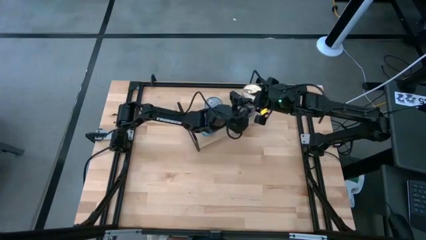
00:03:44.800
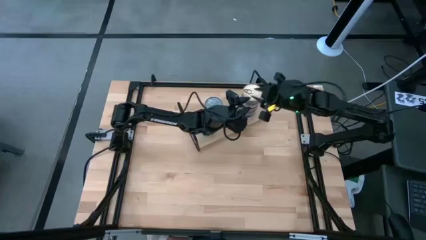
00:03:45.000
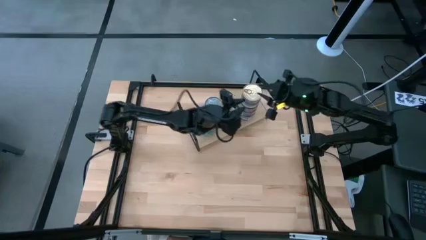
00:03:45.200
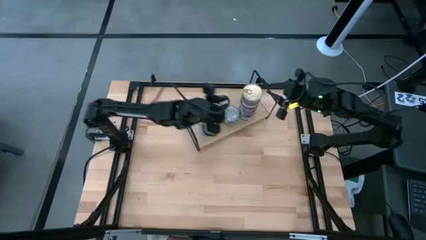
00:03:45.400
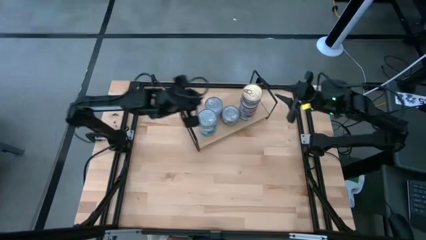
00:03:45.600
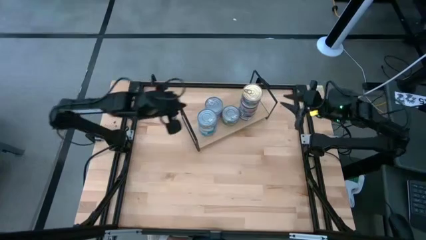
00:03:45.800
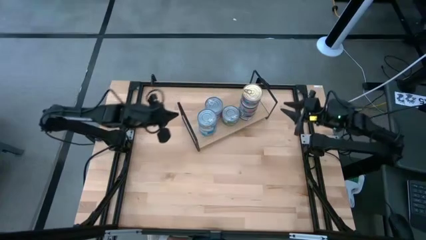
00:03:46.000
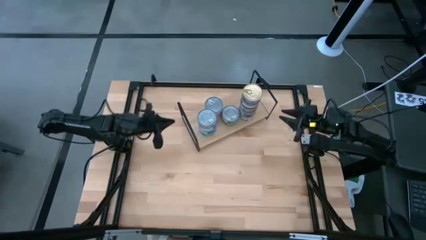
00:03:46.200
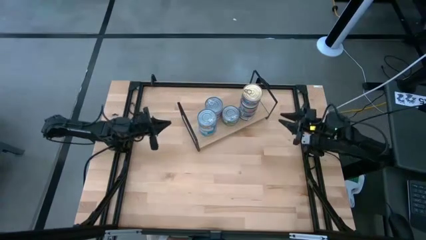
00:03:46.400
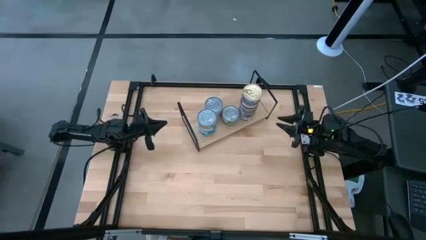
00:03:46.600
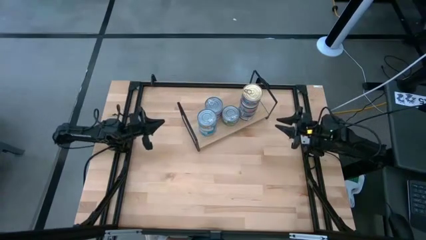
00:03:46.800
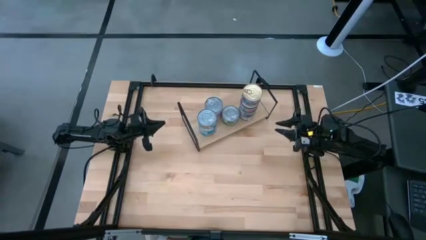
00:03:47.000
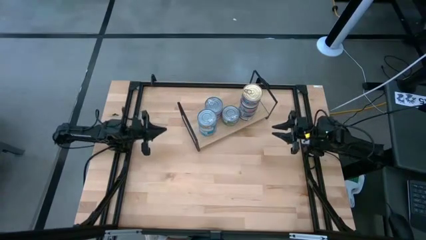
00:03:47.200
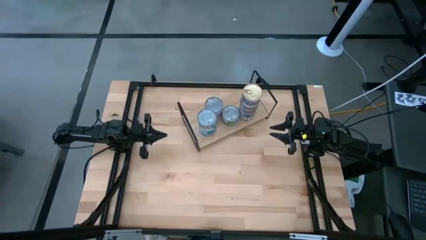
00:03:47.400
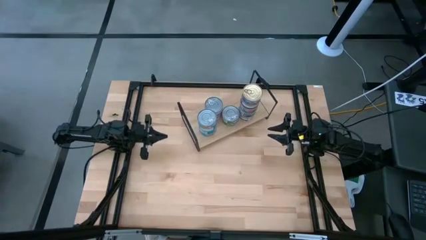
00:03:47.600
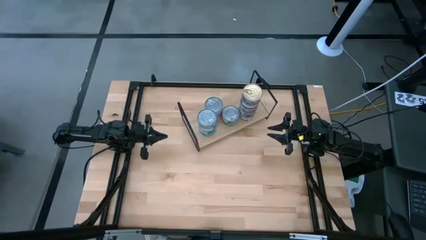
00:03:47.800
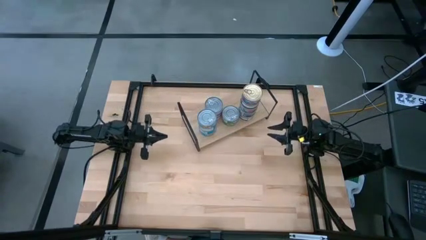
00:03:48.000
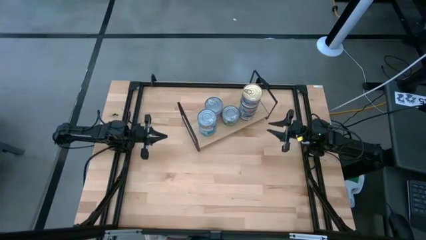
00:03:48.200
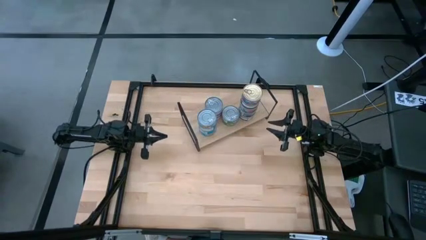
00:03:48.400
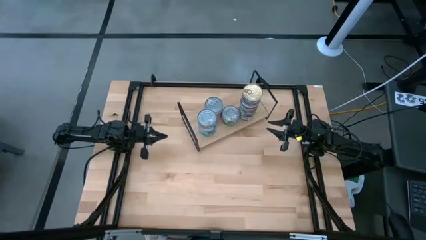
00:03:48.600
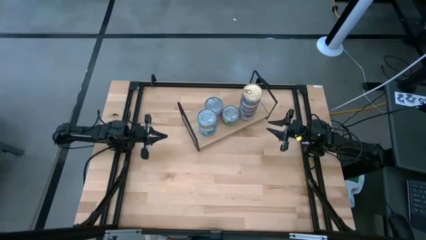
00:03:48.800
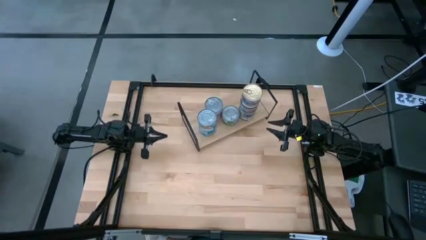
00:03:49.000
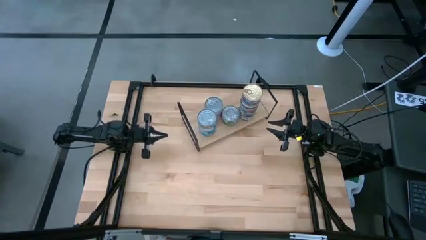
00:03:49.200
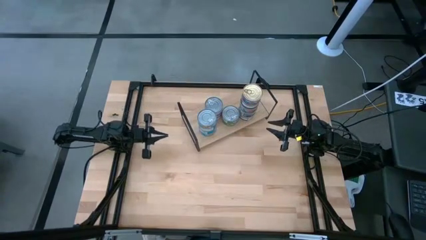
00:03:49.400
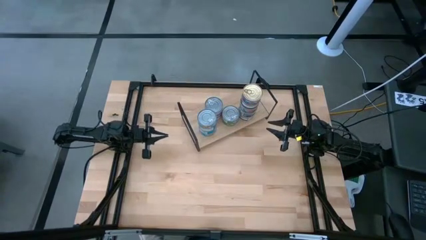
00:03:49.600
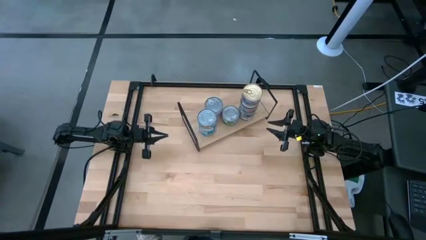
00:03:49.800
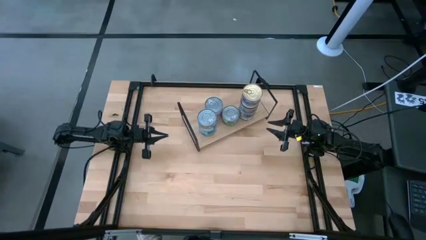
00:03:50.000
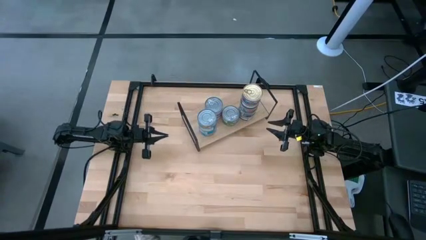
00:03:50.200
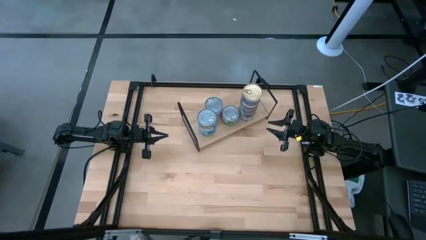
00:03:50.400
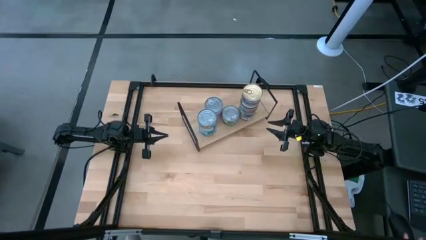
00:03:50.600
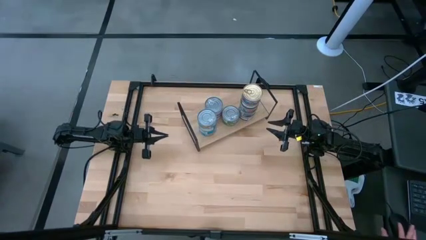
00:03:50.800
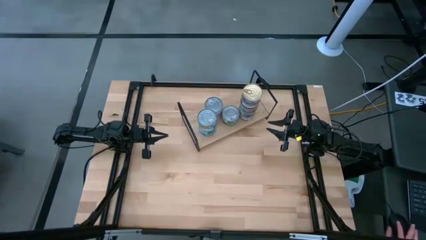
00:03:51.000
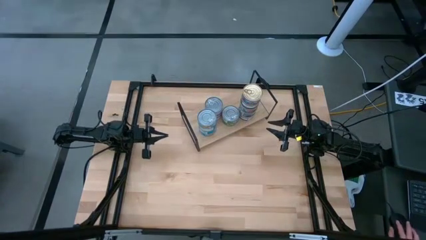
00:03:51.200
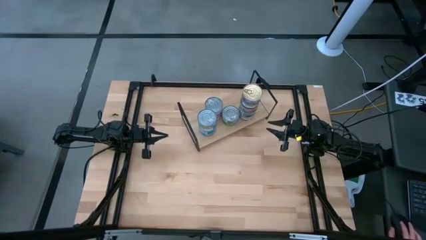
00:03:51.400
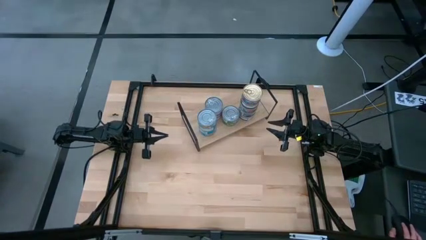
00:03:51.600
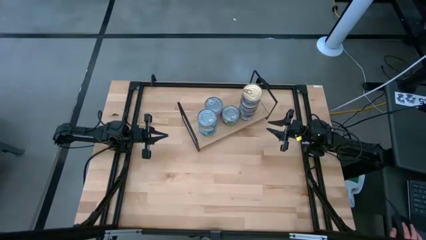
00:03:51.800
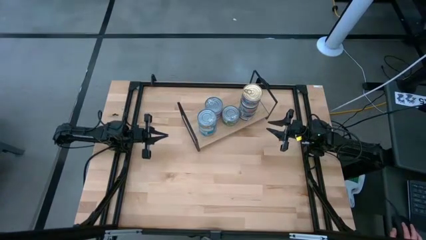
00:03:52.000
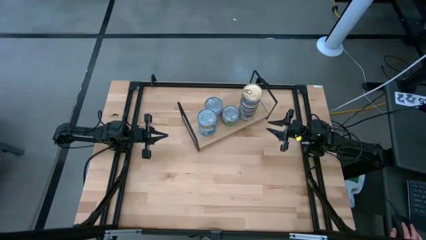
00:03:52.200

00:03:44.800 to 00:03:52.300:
Task: Stack canned seafood by type on shelf
Return to Home Position

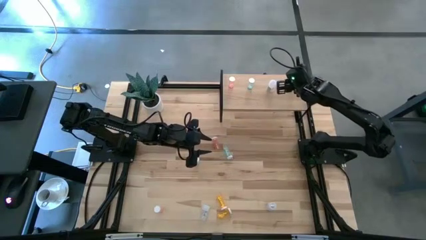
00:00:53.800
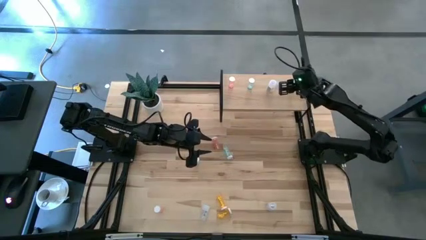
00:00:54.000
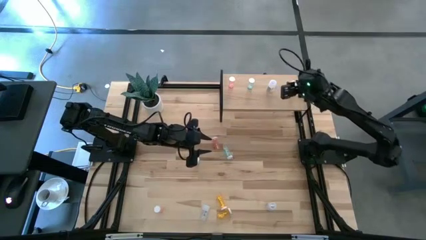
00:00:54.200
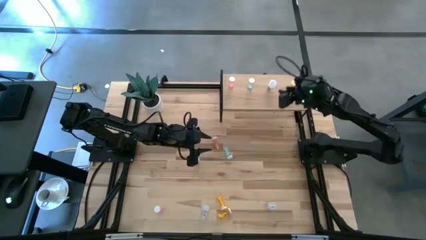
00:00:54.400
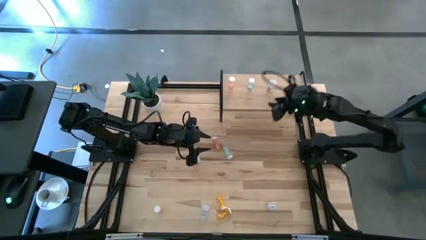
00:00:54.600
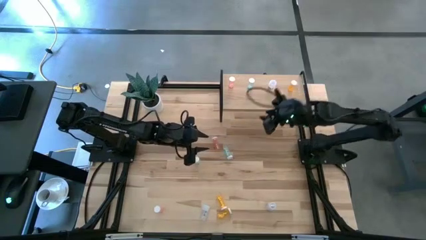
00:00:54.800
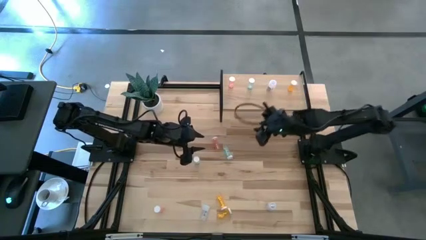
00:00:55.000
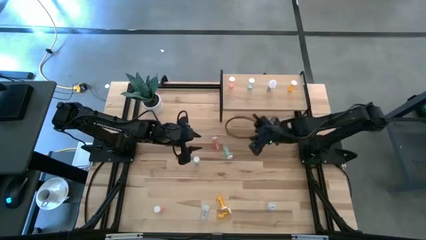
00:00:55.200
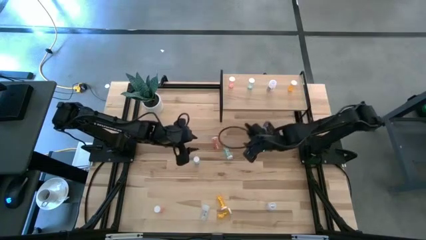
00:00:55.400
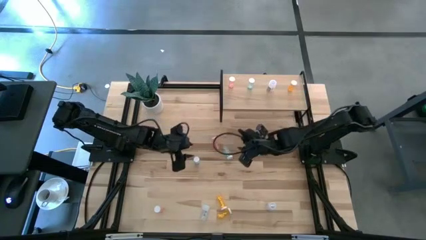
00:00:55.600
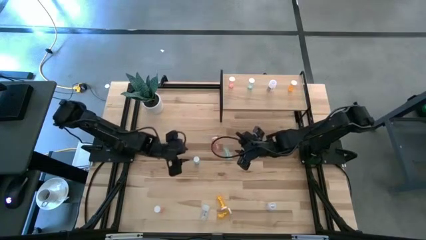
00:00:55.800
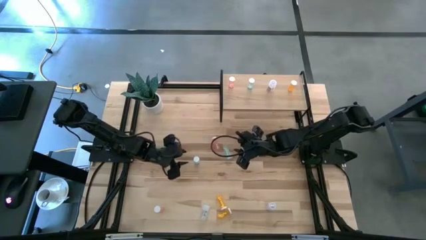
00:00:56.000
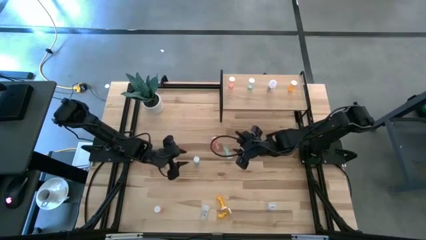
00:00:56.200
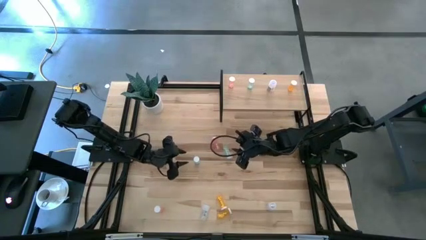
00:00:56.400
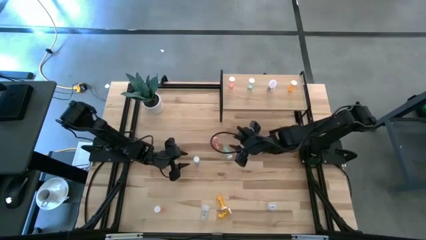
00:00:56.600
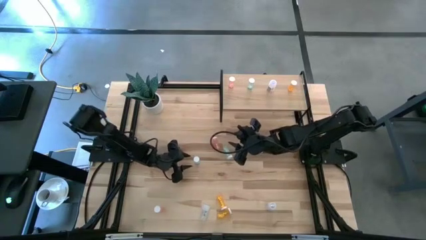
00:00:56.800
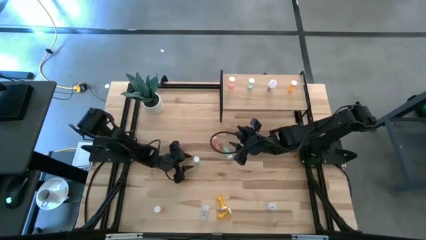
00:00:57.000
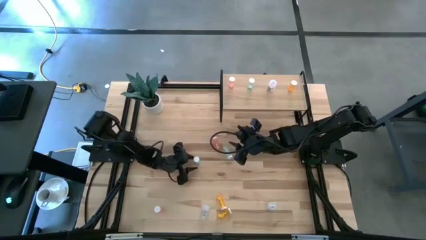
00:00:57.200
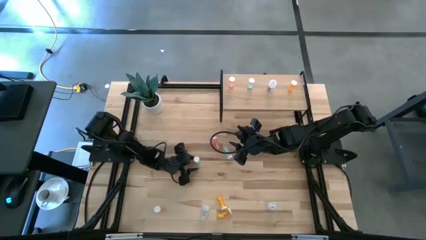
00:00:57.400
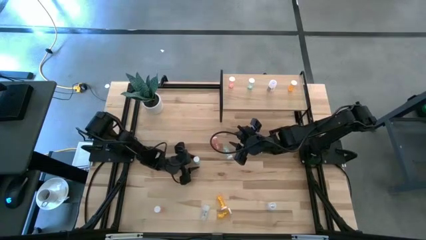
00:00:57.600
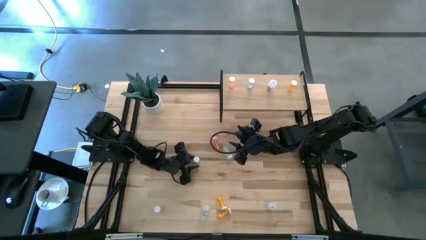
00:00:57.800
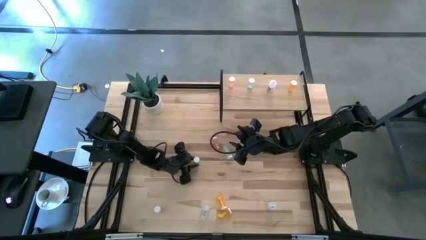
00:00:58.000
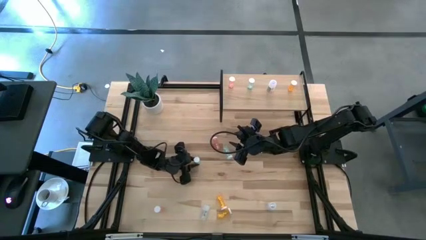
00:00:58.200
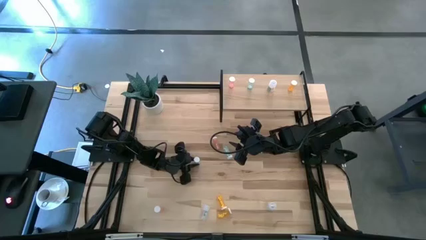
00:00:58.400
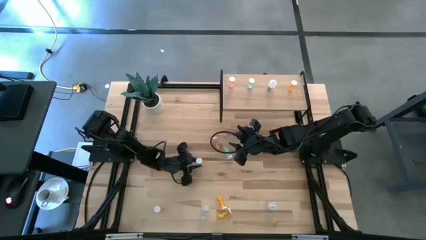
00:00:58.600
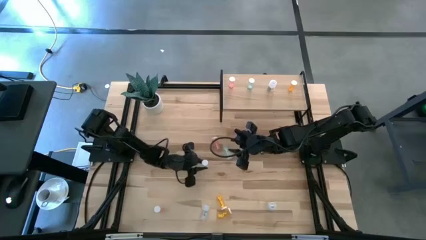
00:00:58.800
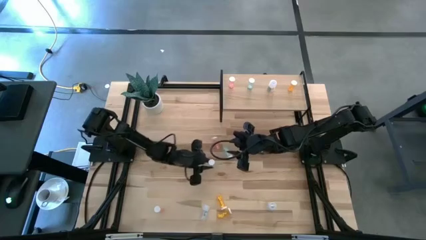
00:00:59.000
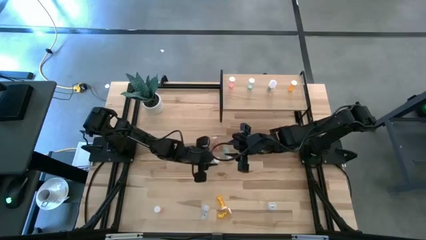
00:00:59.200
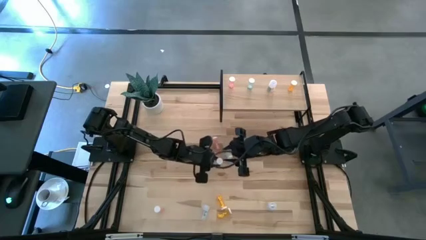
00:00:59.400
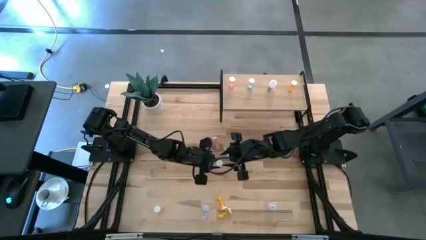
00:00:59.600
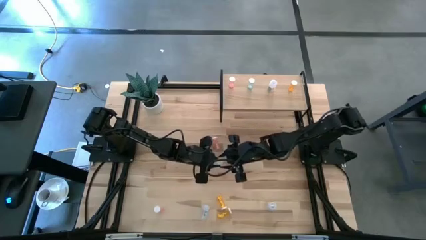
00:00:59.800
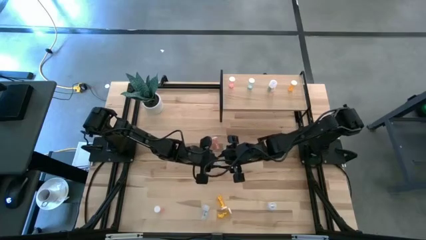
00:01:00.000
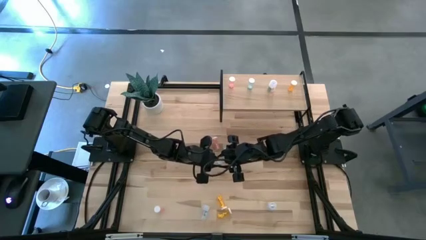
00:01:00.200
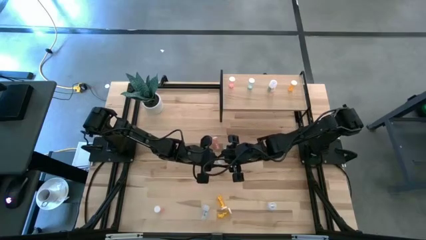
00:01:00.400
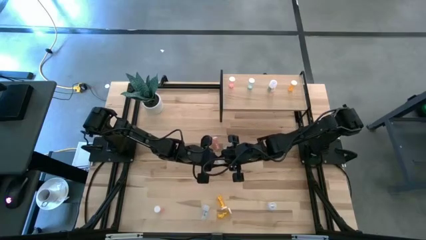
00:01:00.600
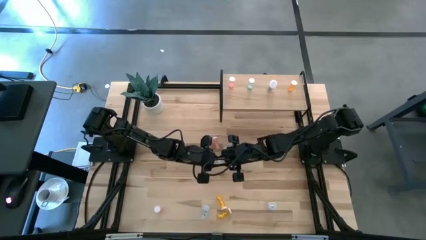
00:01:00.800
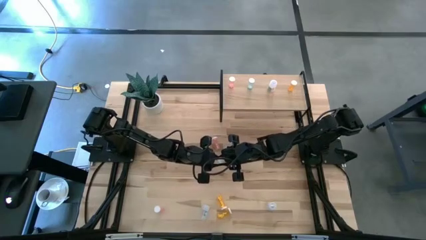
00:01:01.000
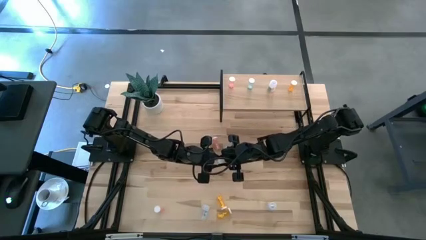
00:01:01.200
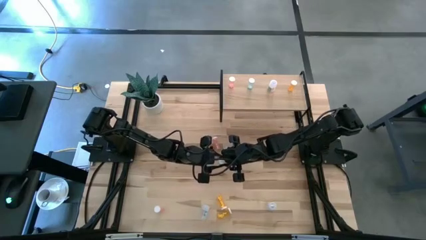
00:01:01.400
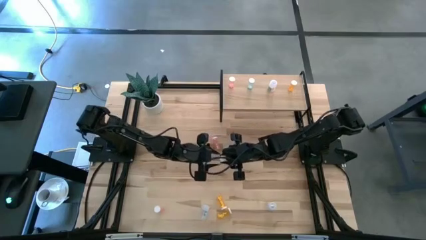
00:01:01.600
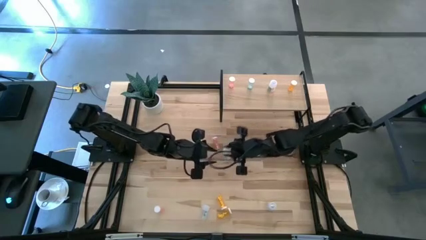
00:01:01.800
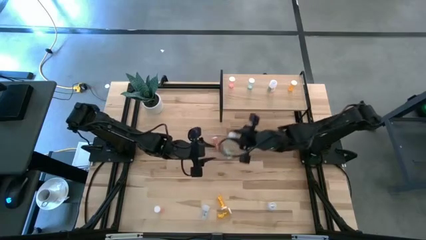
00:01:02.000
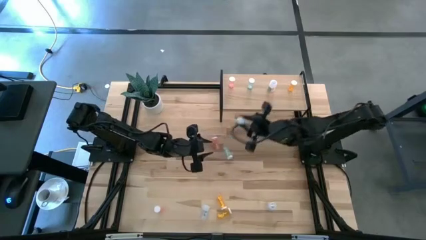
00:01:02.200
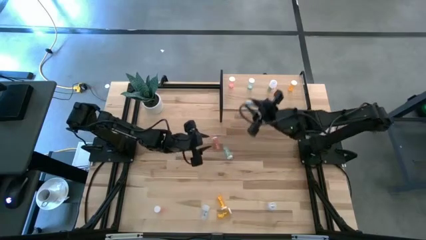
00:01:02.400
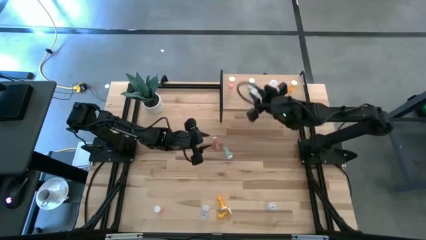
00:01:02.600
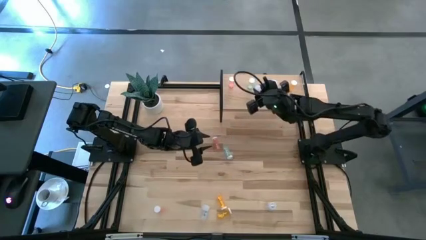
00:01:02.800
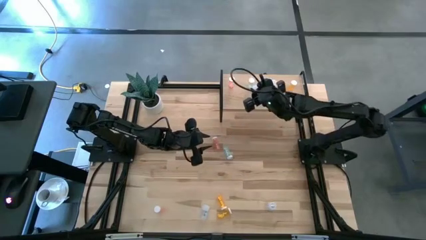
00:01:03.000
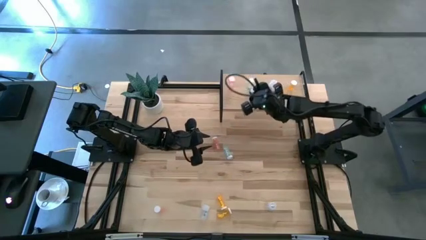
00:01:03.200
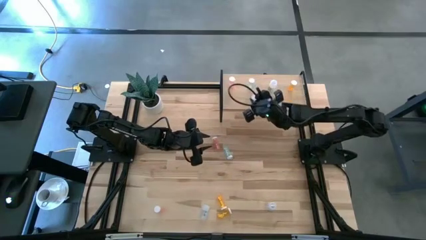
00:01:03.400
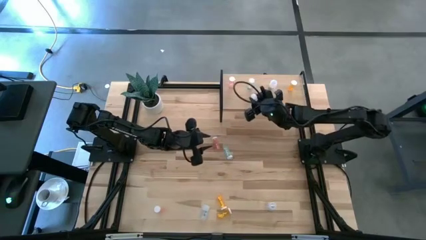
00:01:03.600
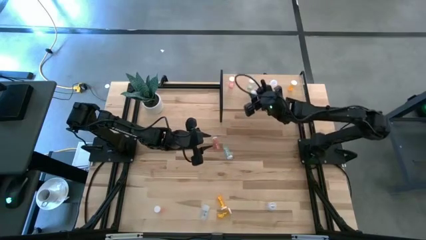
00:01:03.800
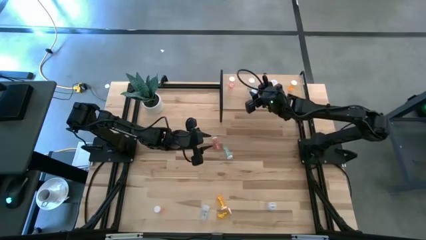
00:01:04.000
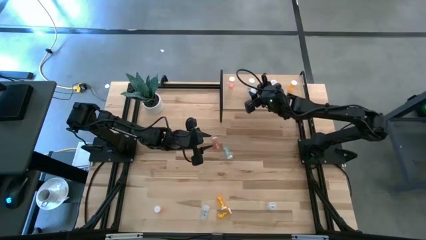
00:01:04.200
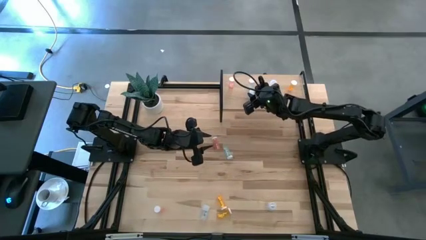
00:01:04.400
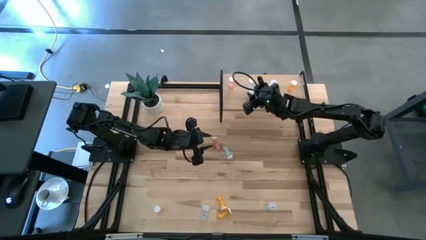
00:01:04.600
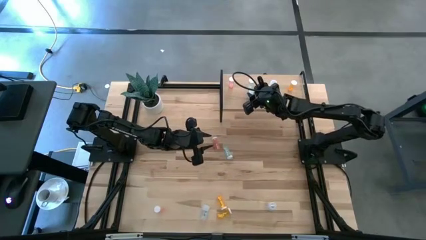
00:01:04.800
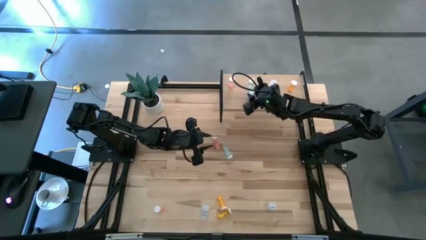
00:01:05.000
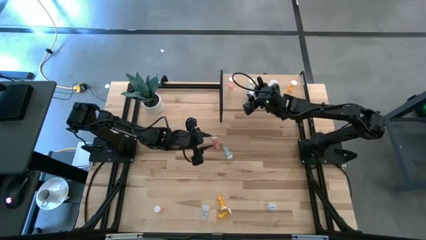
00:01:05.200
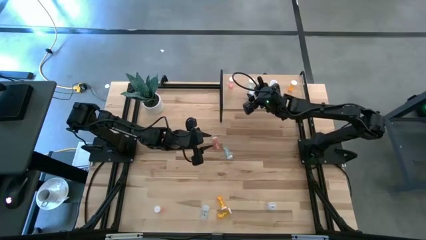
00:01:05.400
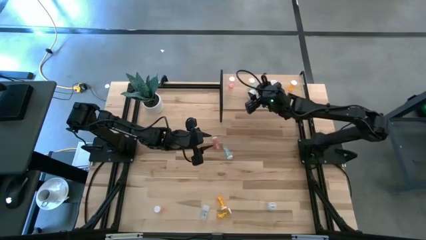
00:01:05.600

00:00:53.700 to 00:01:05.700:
Task: Pick and place medicine bottles onto shelf by color
Put the bottom green pill bottle on the shelf aligned with the other green pill bottle
